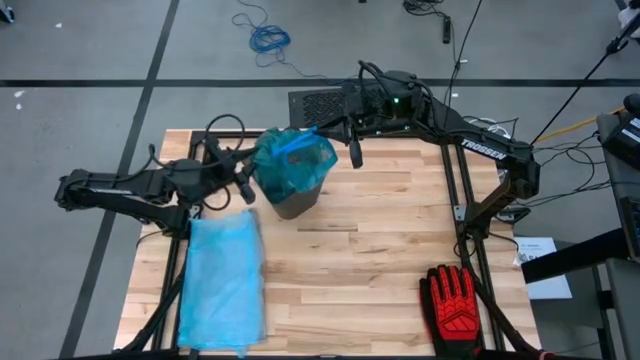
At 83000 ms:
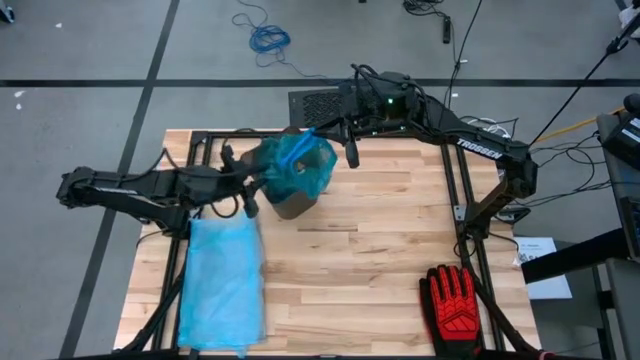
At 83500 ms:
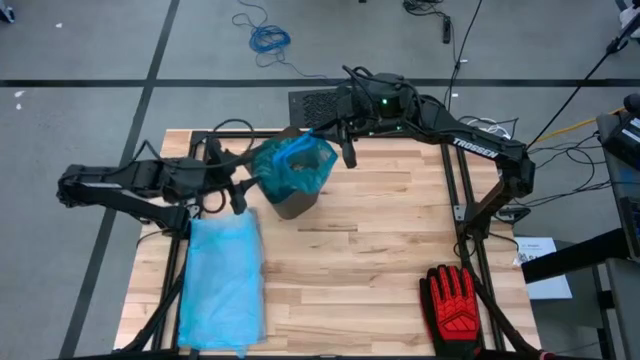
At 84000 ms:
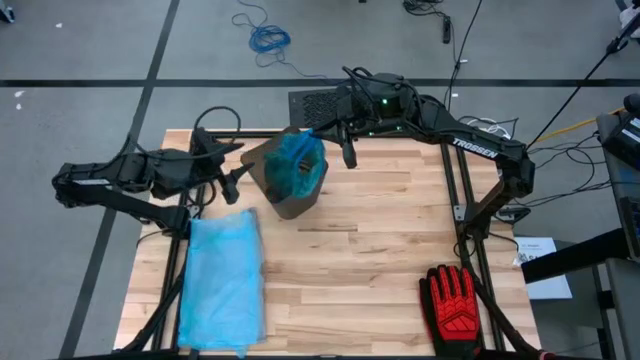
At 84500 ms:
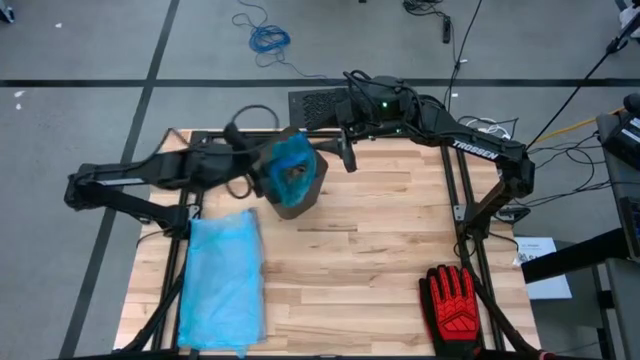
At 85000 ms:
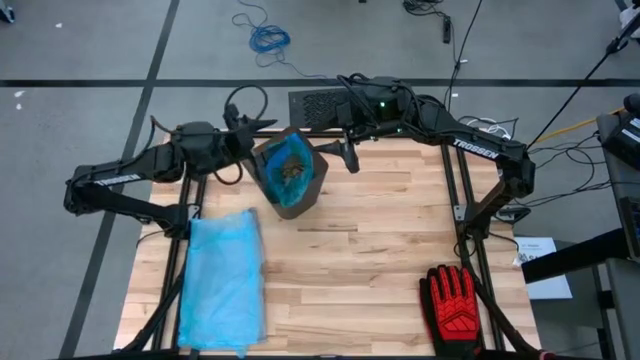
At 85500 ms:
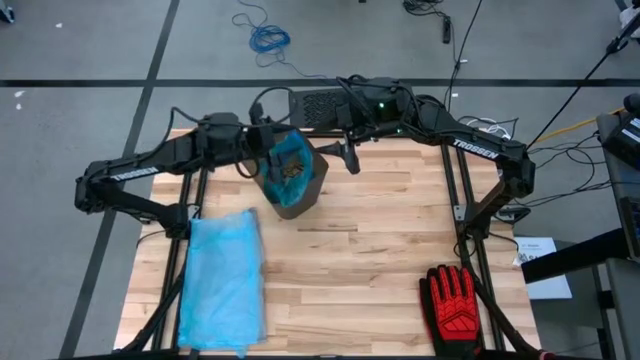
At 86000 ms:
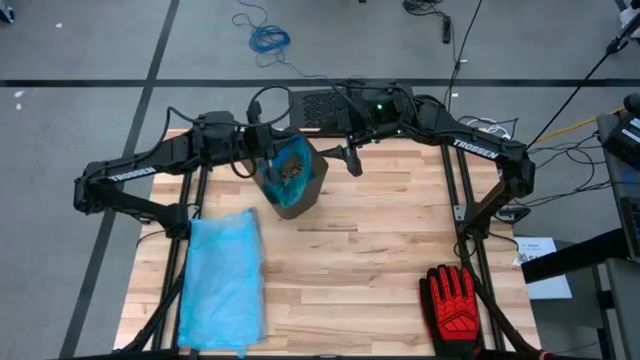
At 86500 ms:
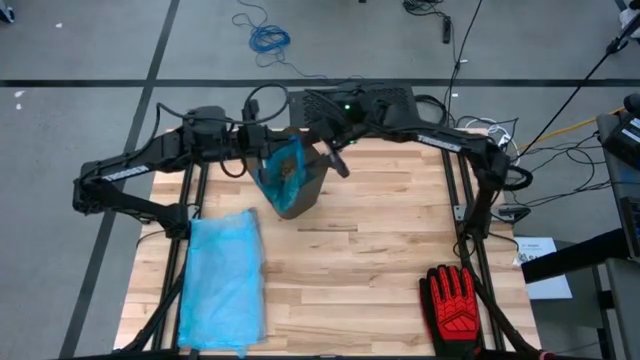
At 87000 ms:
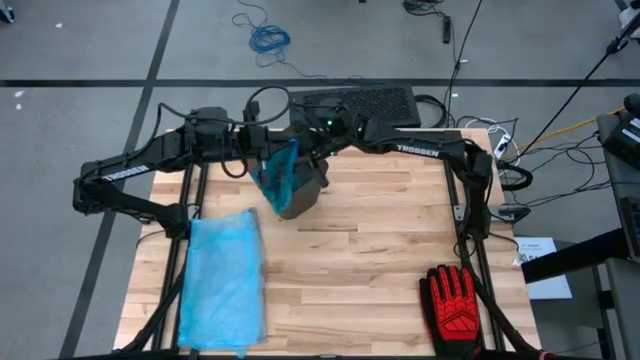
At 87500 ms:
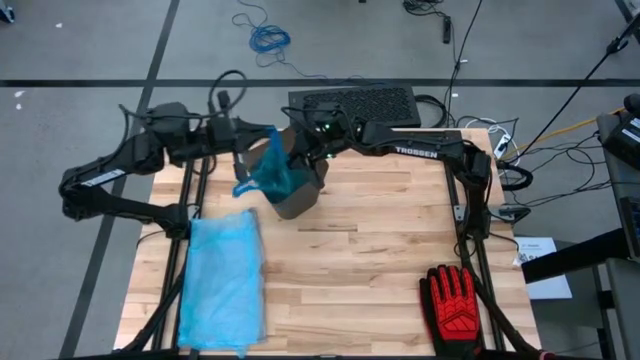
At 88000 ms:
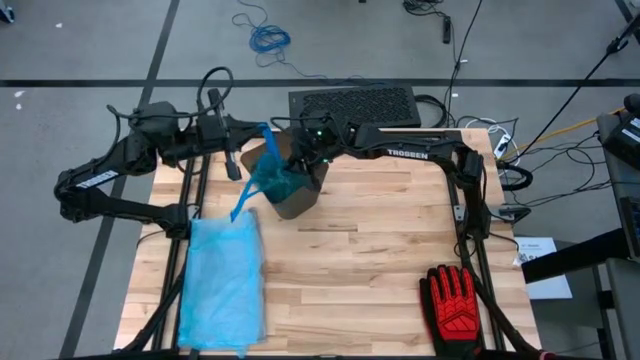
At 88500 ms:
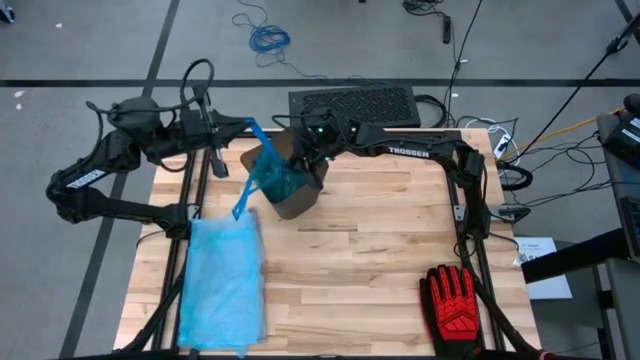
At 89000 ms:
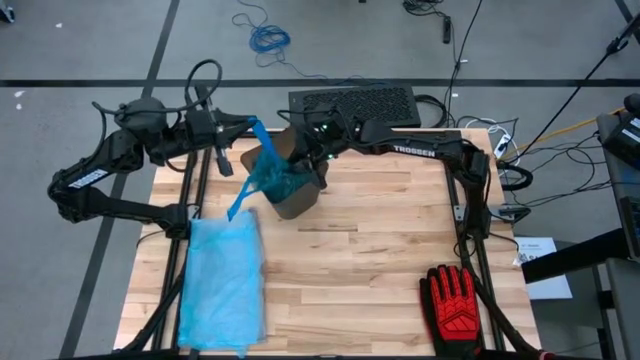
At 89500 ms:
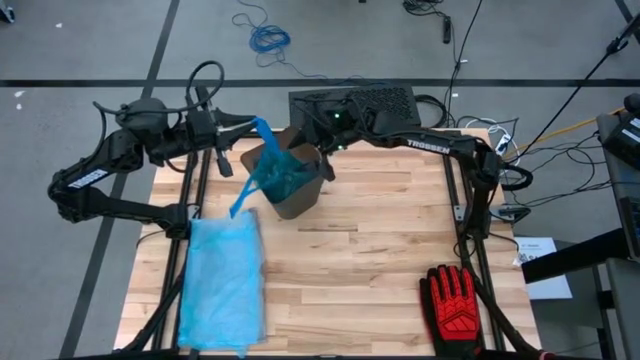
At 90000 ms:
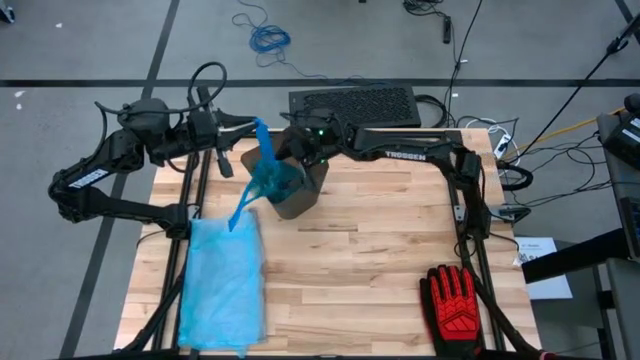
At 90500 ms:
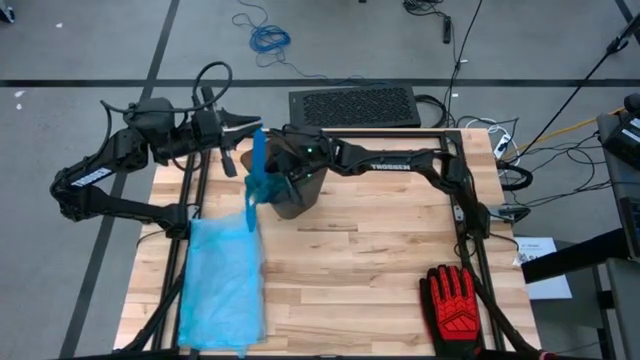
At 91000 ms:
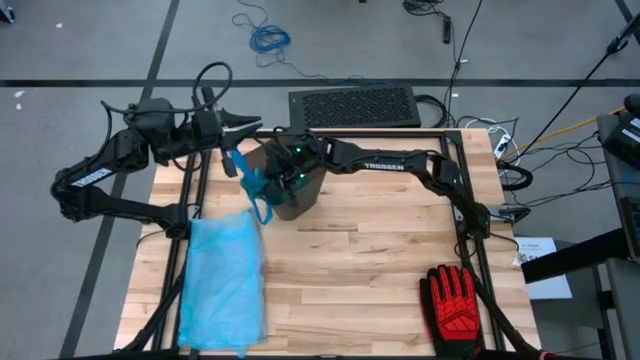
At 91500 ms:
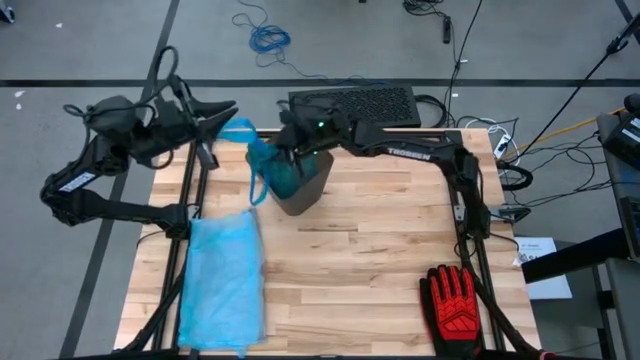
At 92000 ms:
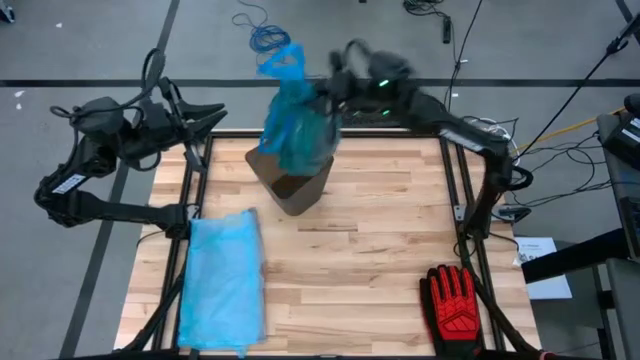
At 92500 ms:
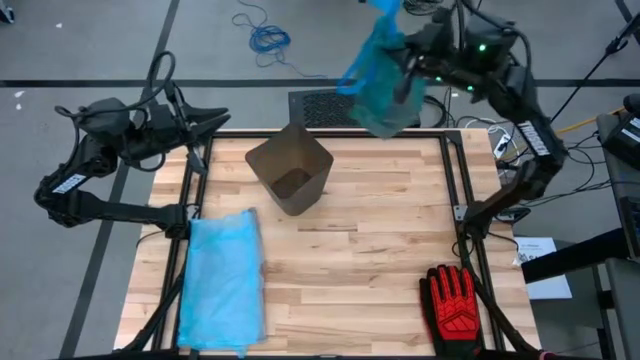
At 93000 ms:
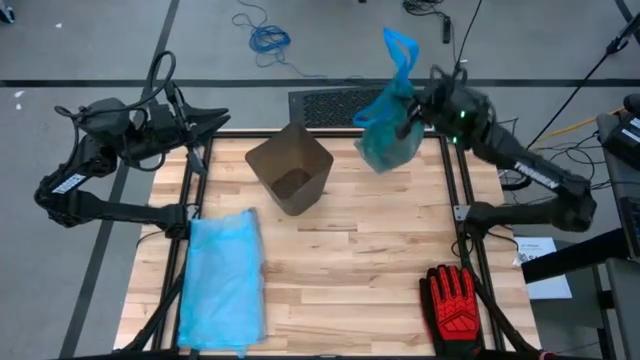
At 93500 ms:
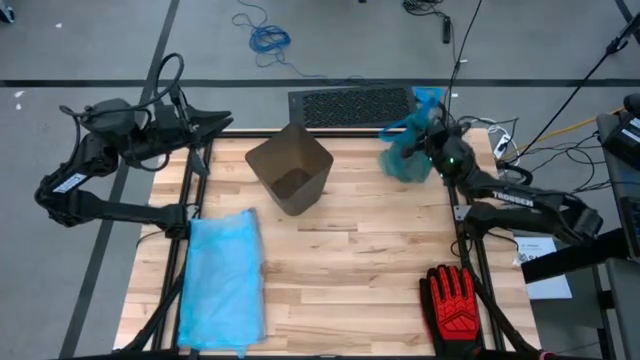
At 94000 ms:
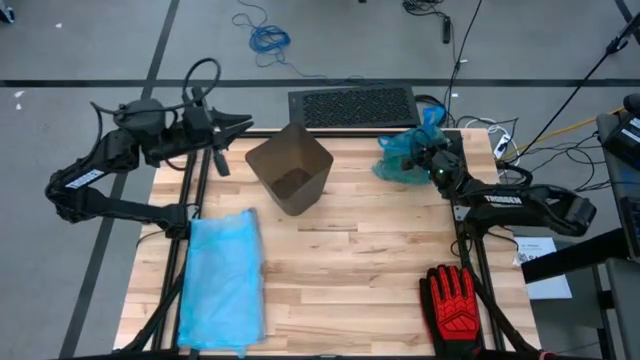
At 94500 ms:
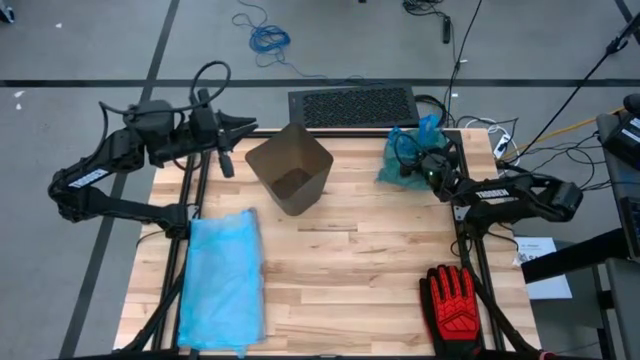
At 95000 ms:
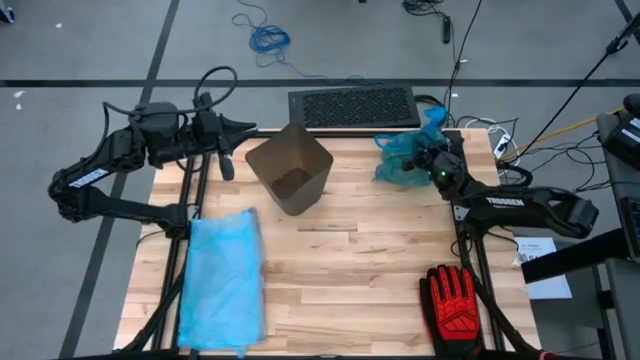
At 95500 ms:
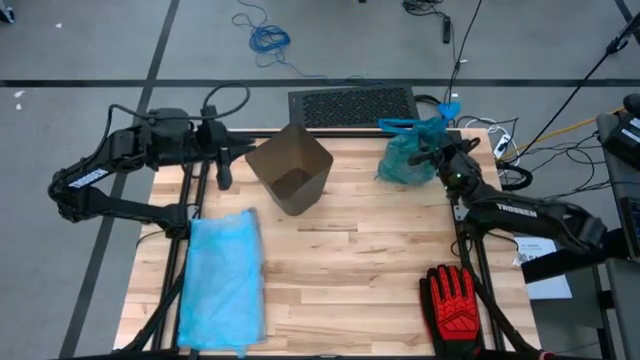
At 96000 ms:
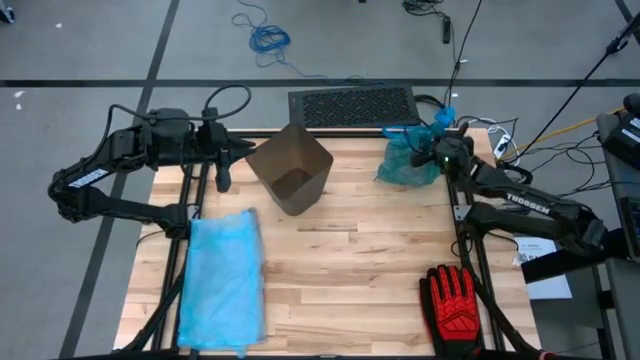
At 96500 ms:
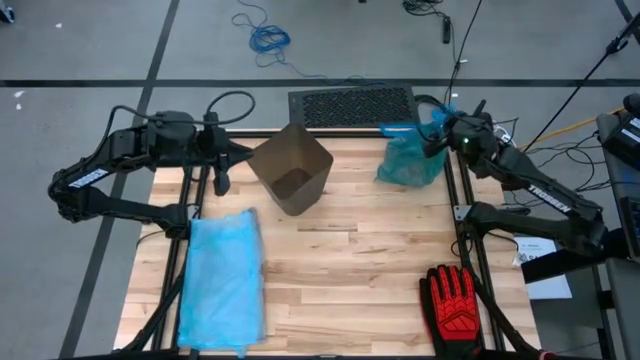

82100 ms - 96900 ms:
Task: place trash/remove bag and relplace
Remove the blue trash bag from the black trash bin

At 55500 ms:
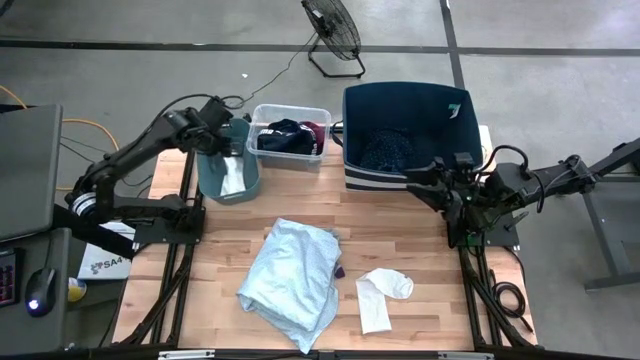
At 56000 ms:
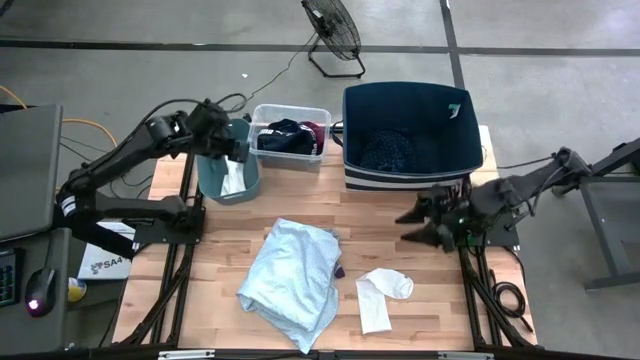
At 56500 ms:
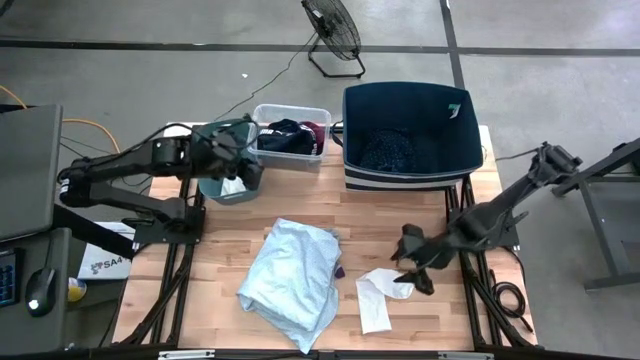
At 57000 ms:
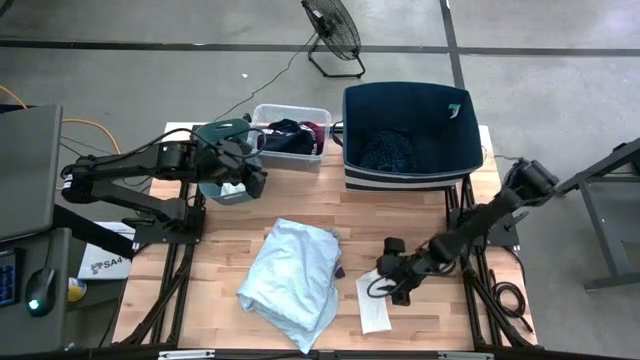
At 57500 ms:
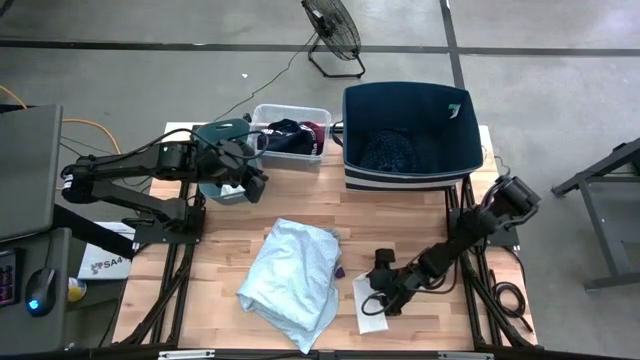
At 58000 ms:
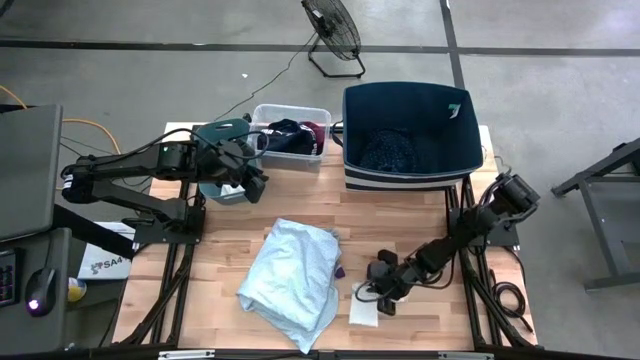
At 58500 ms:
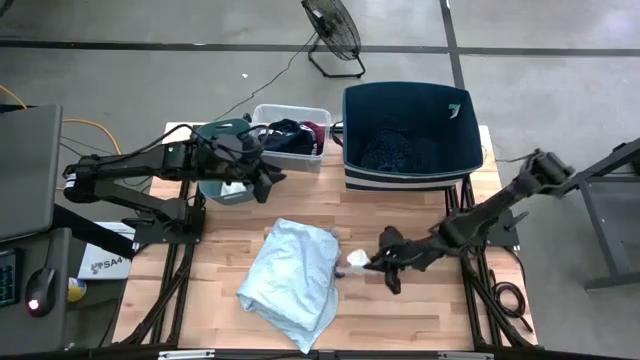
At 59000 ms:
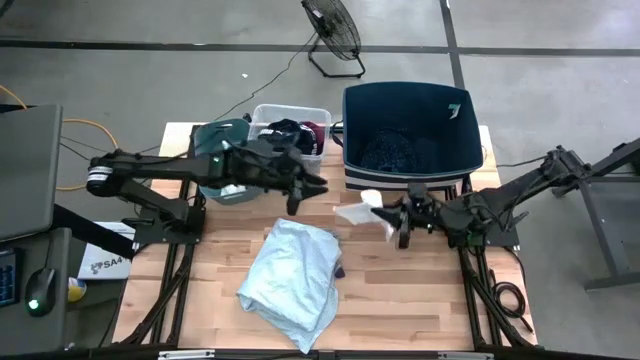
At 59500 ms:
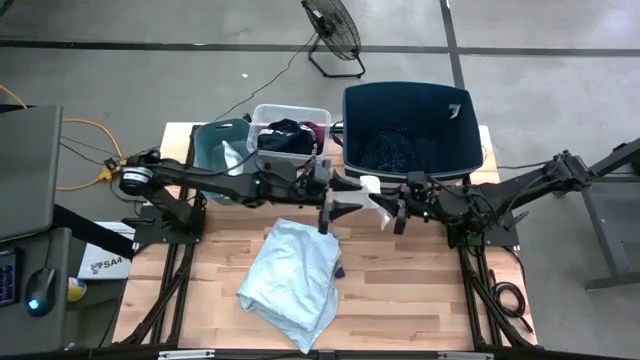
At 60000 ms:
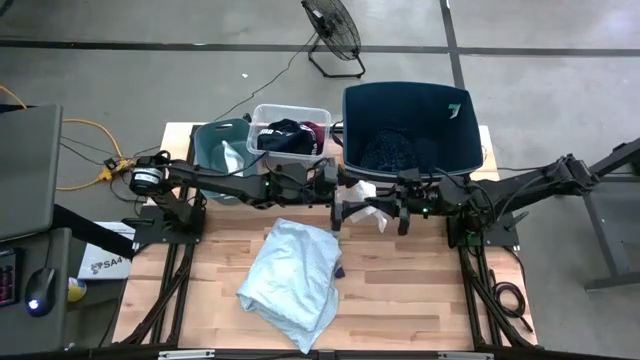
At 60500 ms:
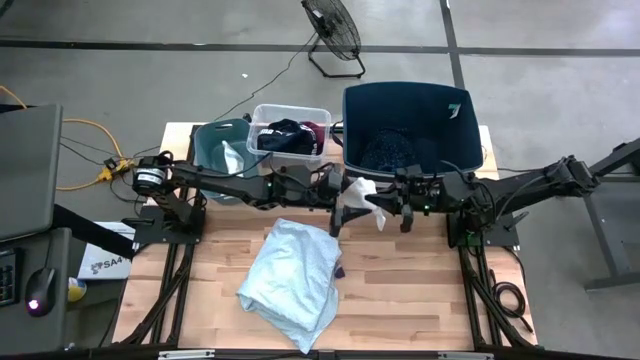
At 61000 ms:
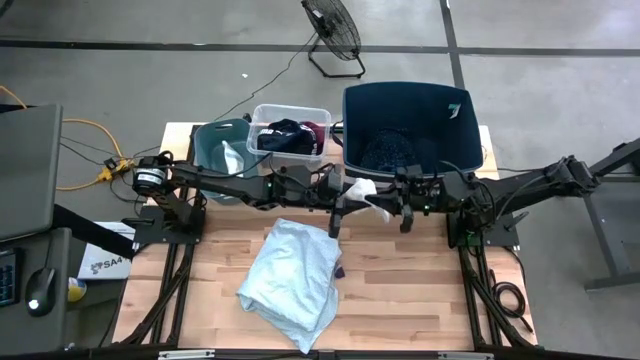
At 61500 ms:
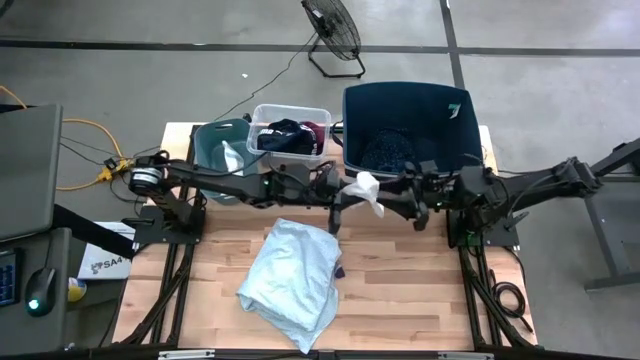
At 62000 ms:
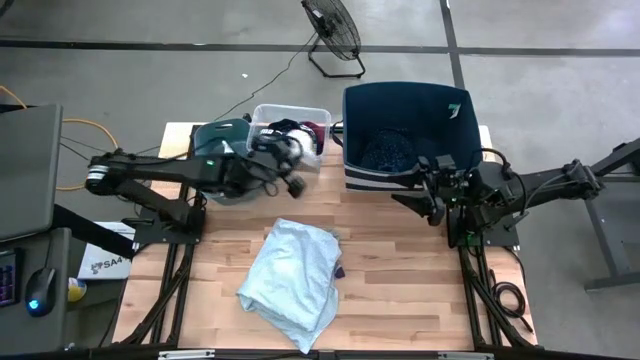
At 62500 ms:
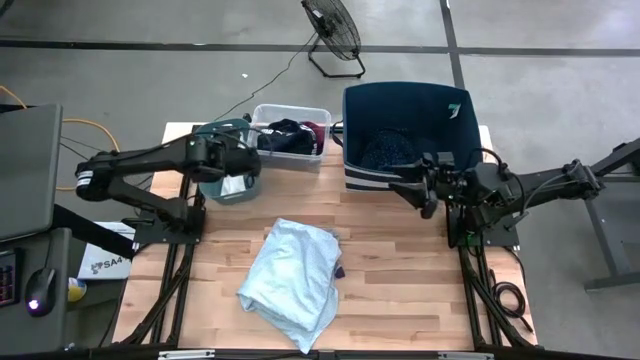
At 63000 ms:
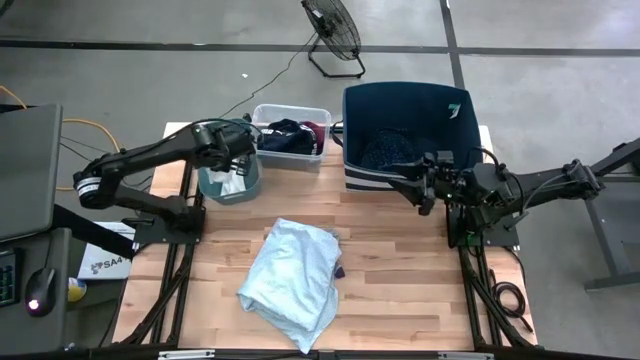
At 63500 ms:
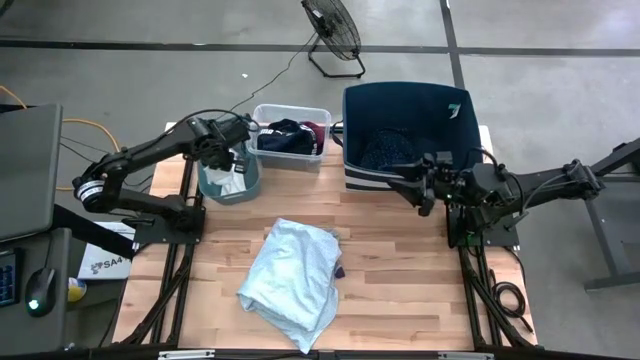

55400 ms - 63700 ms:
Task: Pick & Place Cloths
Put the white sock into the blue bin
